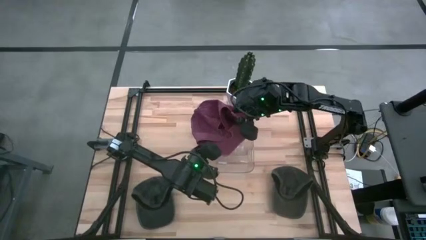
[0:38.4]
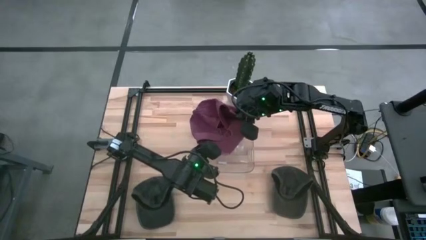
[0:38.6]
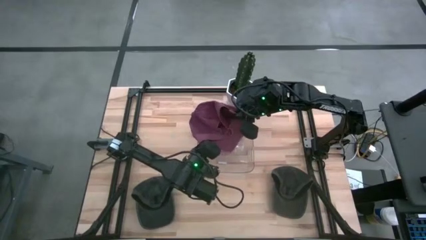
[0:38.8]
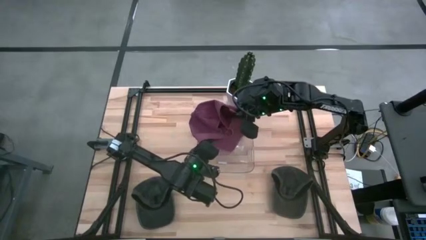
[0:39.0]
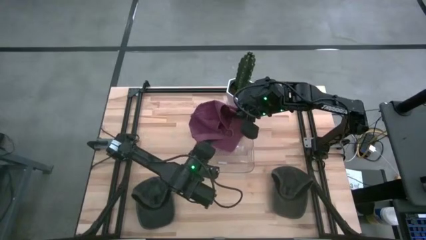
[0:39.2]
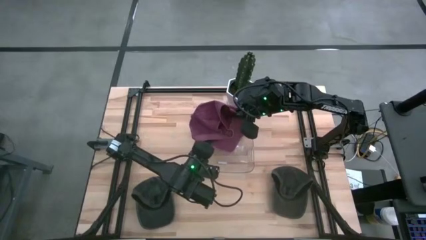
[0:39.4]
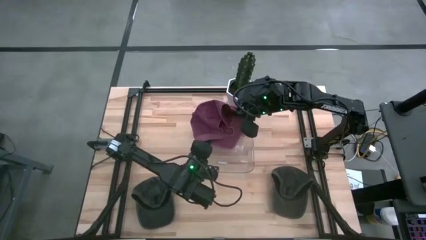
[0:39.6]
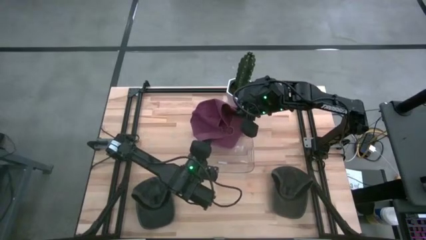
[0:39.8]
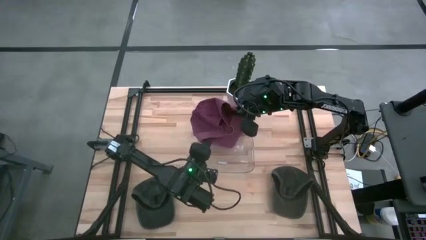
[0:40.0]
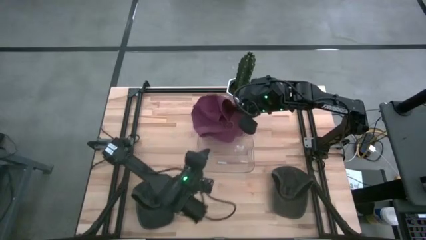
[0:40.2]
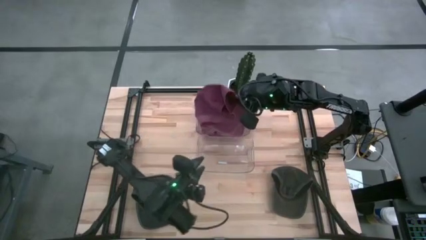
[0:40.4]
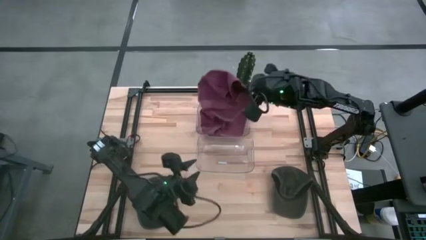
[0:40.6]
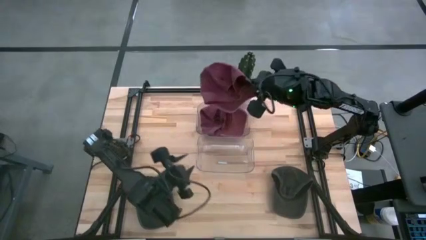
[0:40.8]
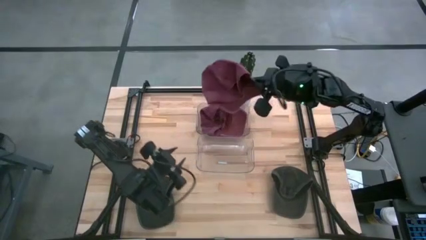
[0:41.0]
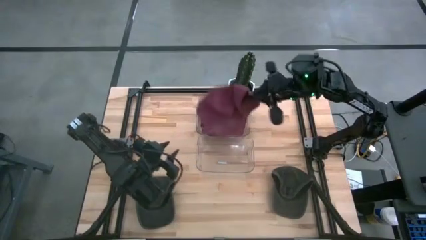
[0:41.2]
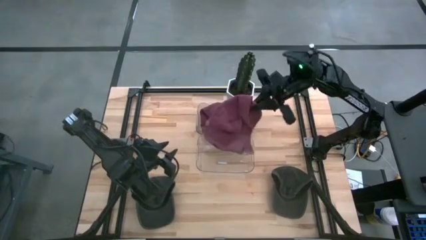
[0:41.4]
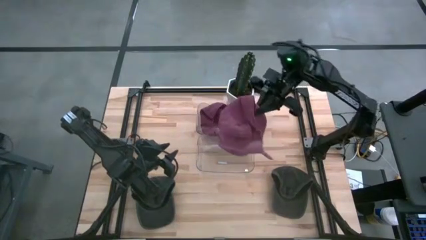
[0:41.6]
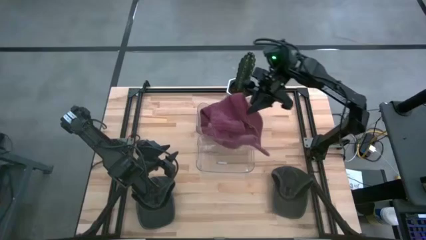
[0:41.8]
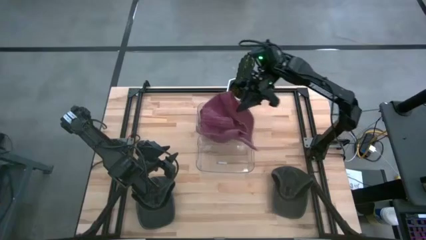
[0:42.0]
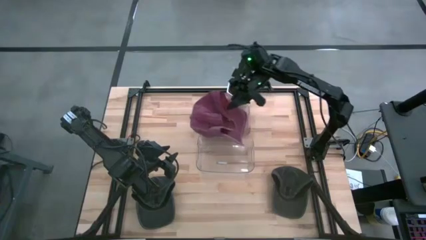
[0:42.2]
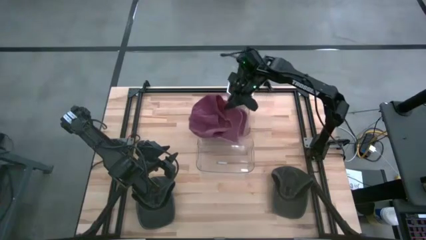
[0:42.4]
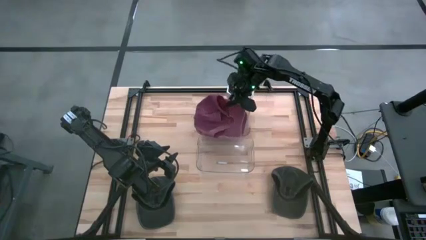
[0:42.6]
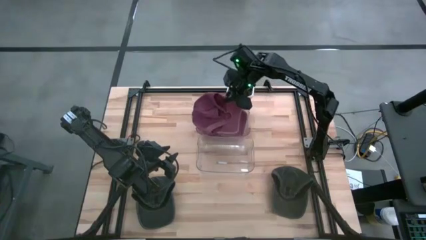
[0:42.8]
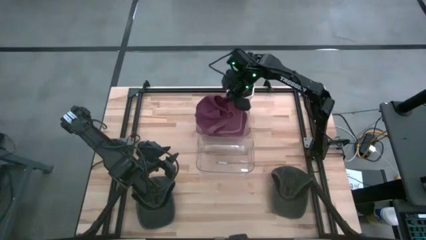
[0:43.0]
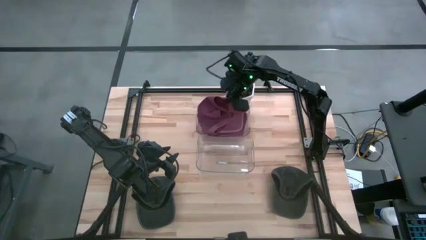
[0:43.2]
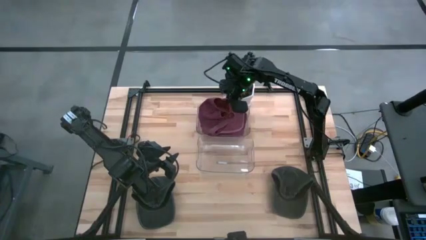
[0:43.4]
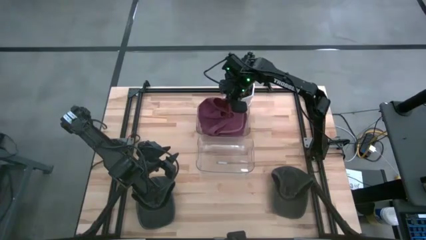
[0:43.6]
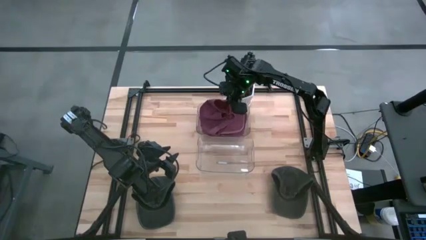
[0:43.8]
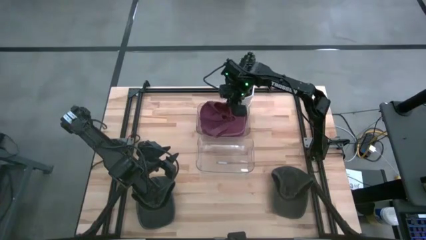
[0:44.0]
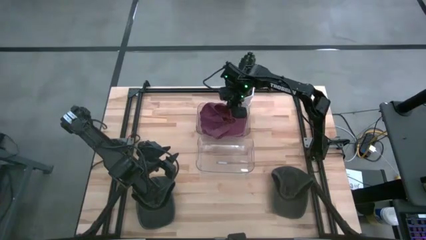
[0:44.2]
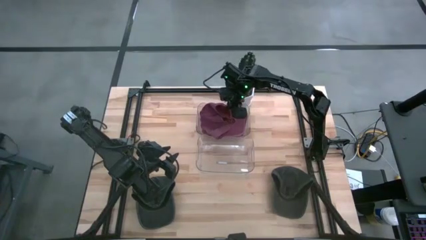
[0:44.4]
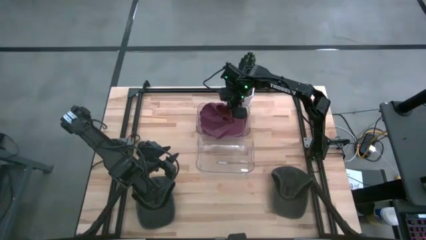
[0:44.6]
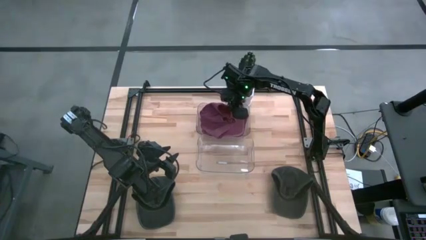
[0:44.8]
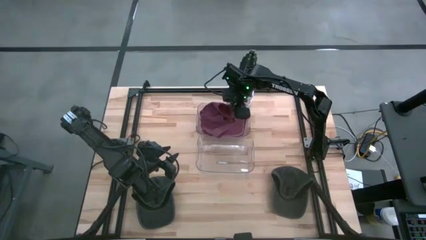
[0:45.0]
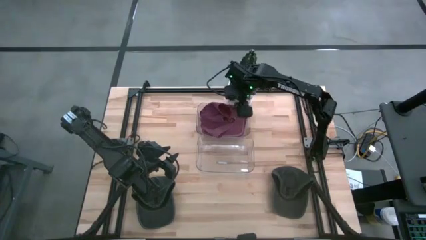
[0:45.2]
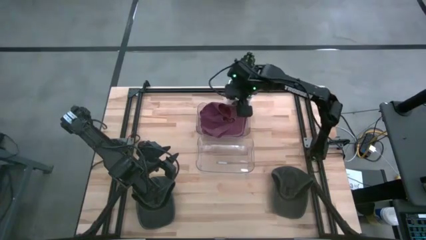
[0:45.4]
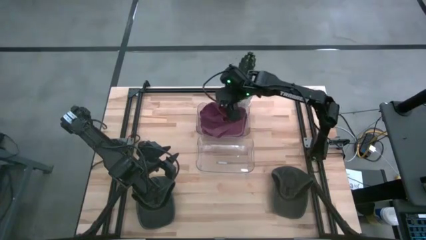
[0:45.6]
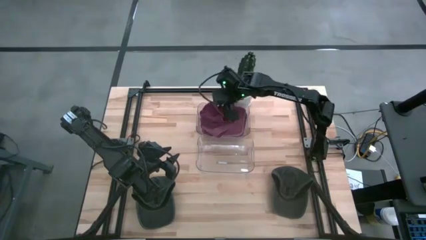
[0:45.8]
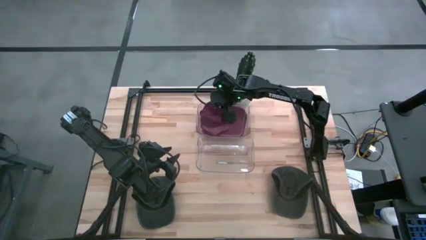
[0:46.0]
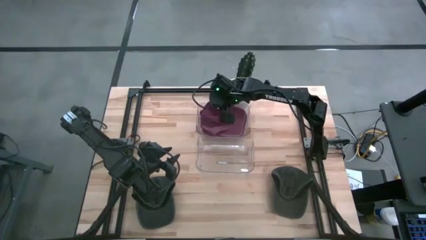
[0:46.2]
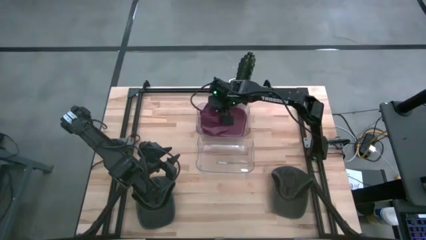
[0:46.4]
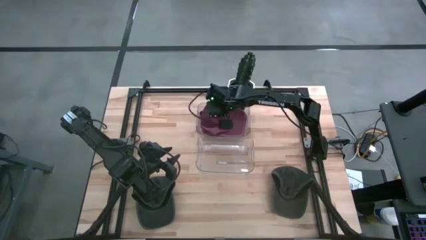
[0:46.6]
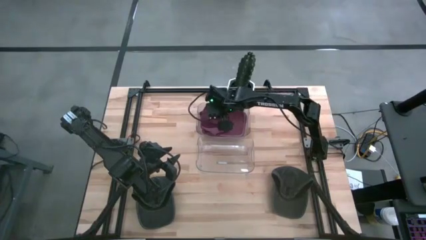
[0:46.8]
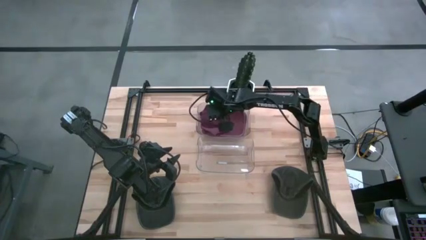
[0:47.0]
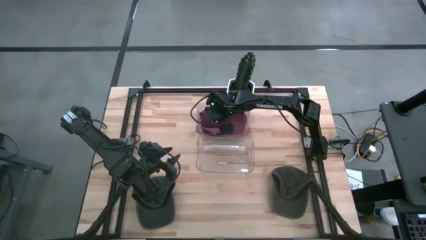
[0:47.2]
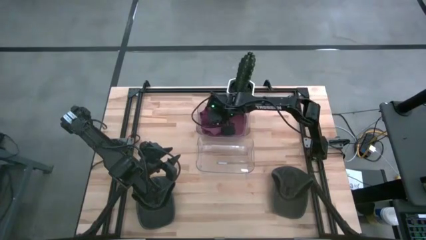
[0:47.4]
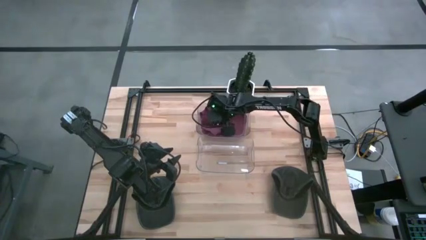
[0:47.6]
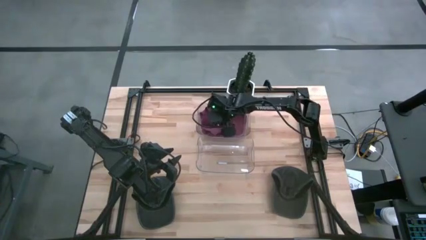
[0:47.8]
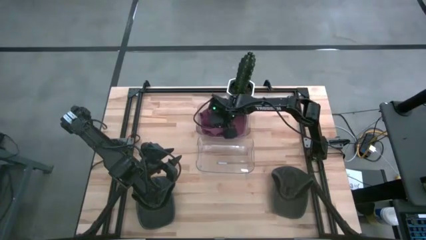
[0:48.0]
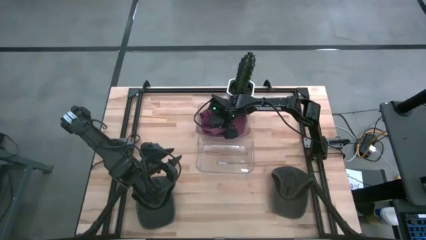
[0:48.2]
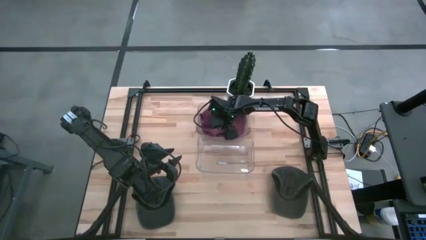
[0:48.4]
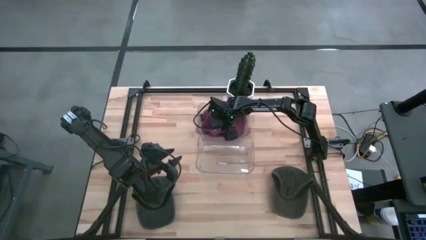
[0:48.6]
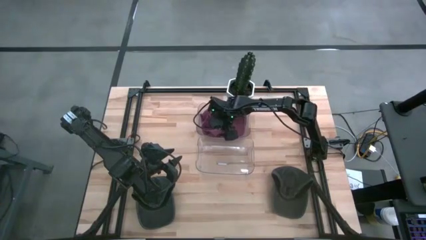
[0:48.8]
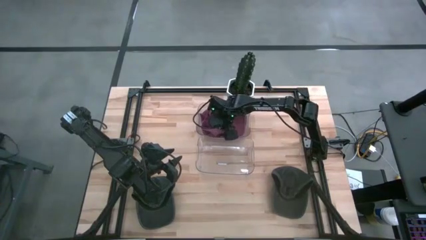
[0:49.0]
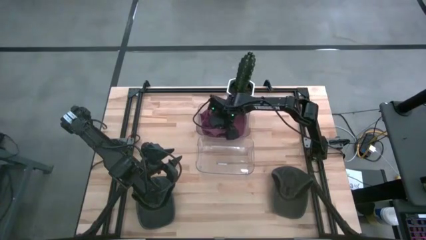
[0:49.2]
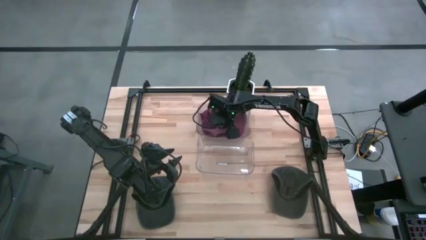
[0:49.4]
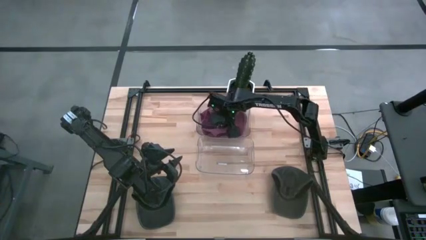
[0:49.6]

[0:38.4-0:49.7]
Task: Pick & Place hat
Put the red cap into the top transparent bin

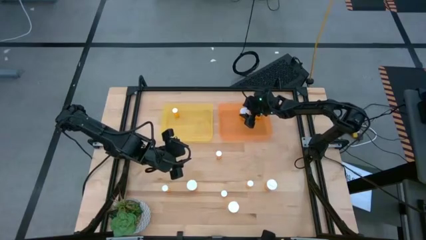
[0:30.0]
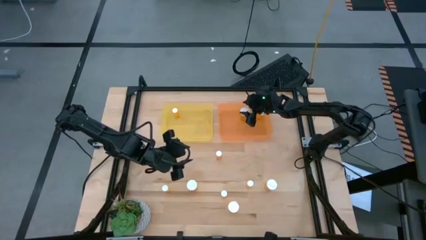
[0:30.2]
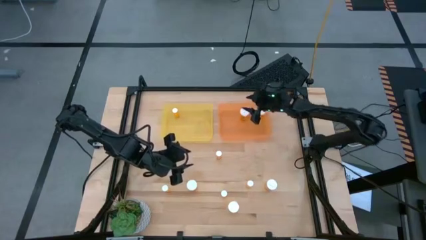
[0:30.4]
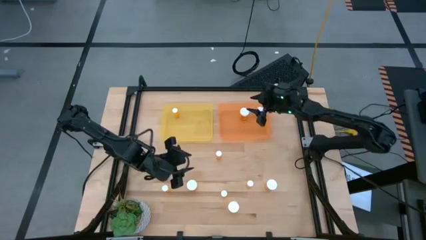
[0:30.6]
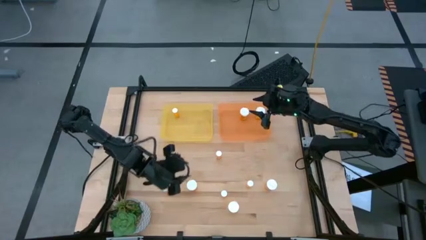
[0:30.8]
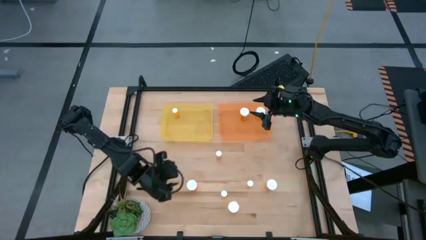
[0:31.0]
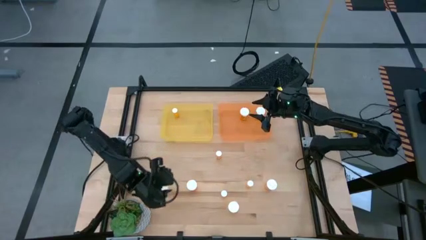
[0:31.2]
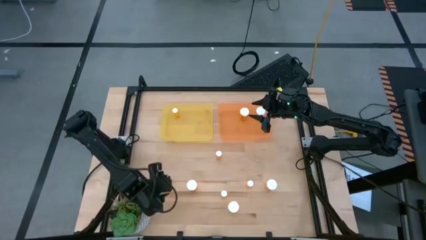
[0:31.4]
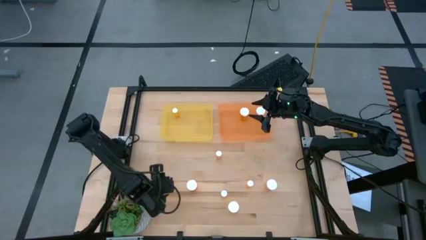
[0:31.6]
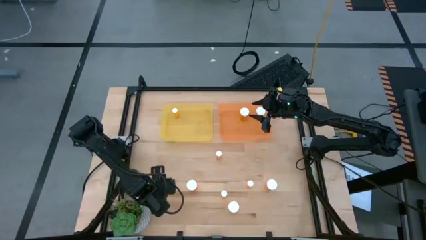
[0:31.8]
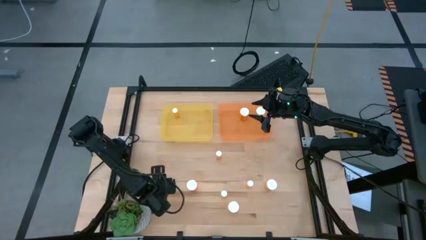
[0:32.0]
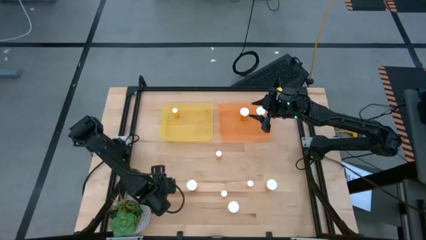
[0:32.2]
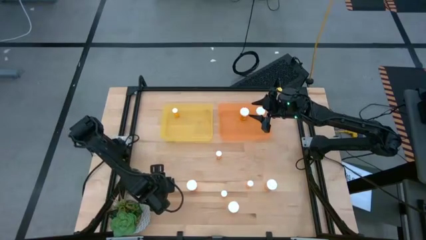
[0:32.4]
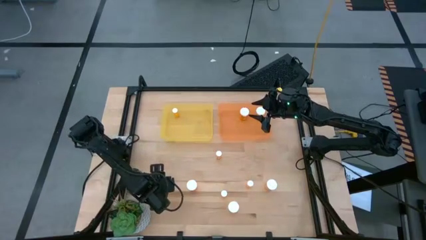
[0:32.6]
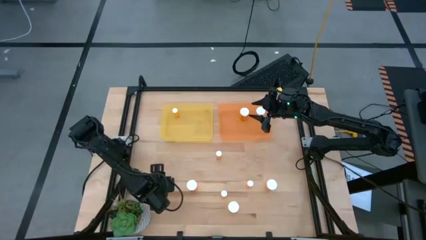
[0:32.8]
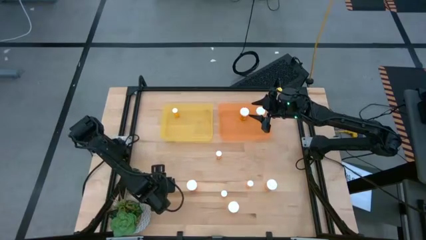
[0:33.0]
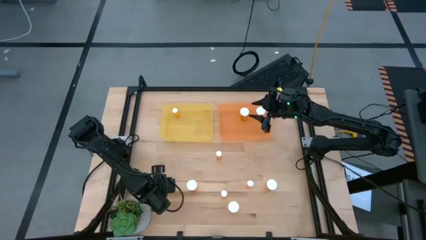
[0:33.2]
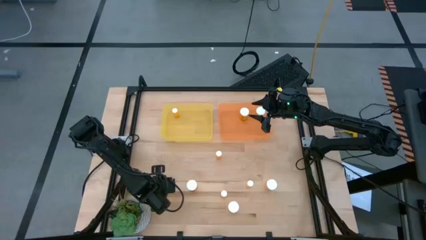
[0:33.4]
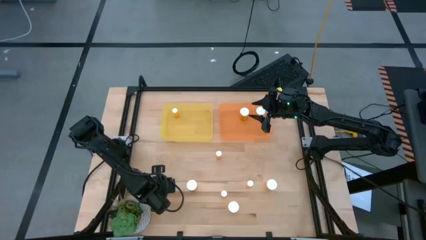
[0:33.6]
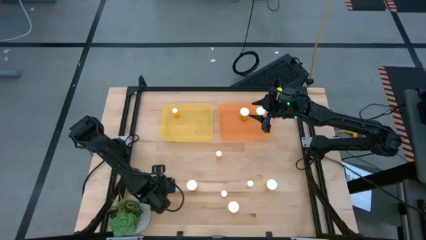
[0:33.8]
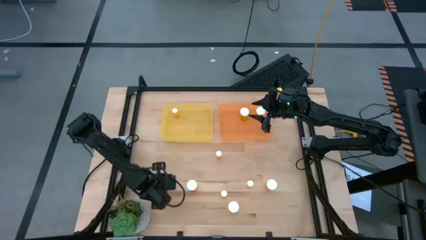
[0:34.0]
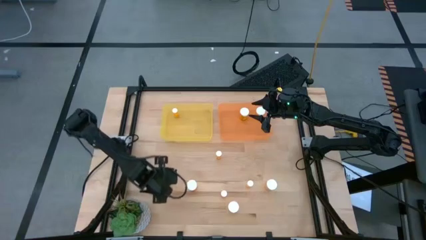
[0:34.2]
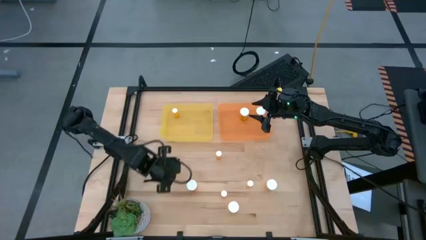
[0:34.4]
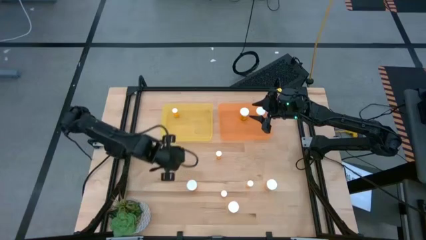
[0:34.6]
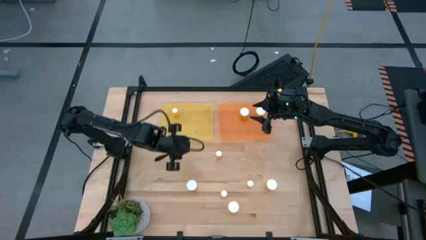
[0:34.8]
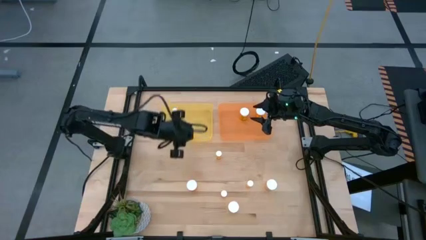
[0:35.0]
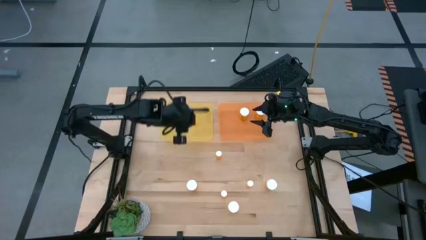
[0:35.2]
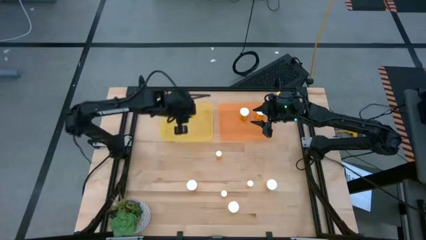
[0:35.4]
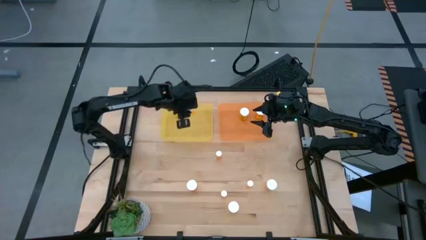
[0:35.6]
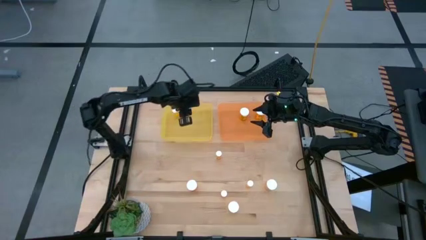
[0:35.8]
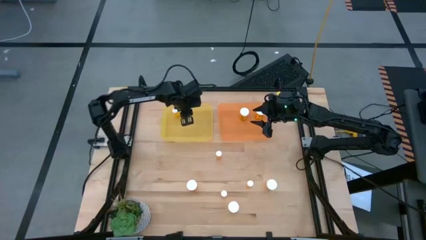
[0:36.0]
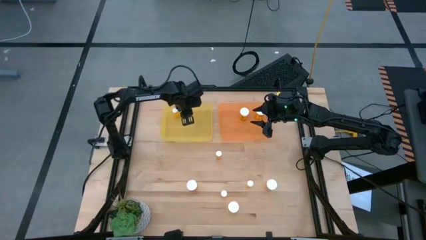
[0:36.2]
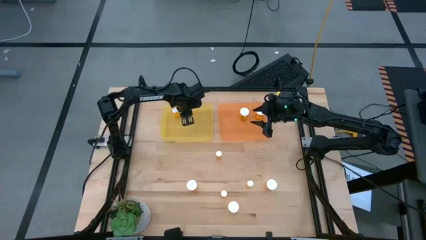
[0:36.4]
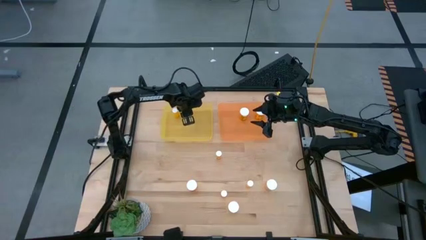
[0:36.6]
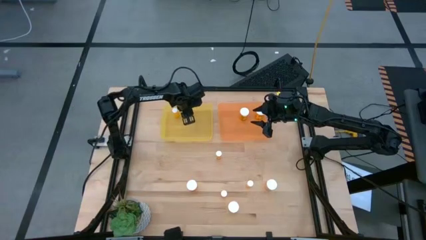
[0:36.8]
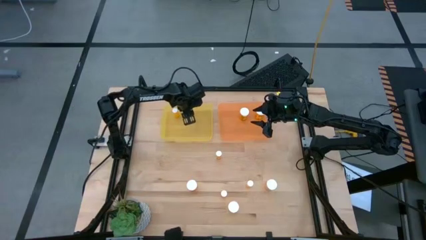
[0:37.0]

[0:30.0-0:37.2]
Task: Pick and place medicine bottles into bin by pill shape (circle, oval)
Put the small orange pill bottle into the yellow bin
